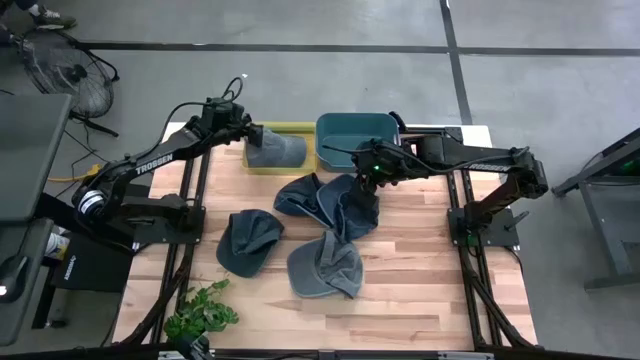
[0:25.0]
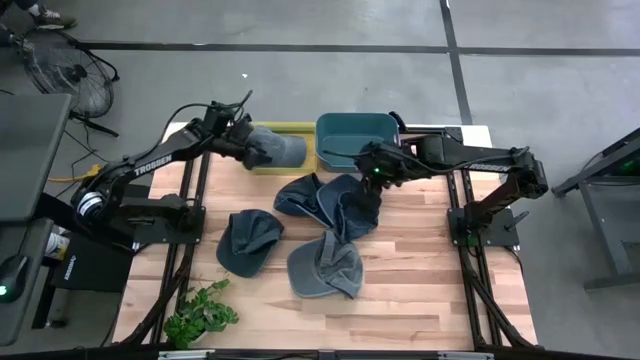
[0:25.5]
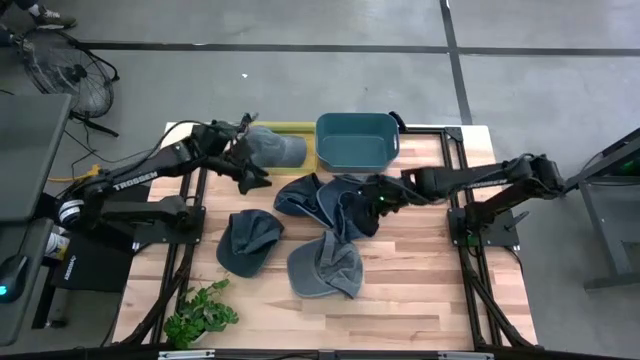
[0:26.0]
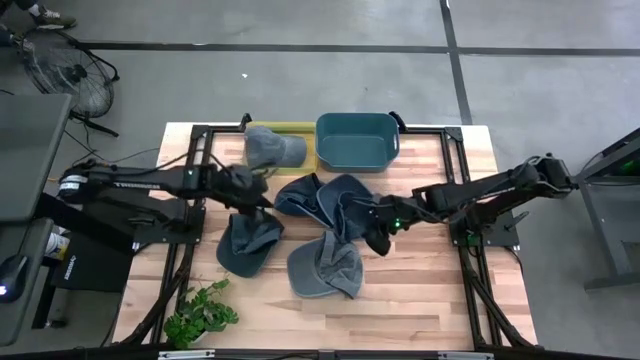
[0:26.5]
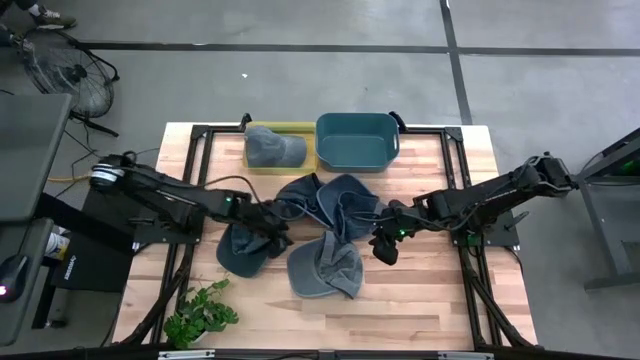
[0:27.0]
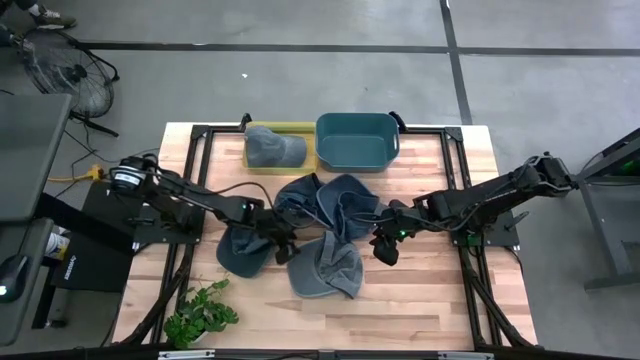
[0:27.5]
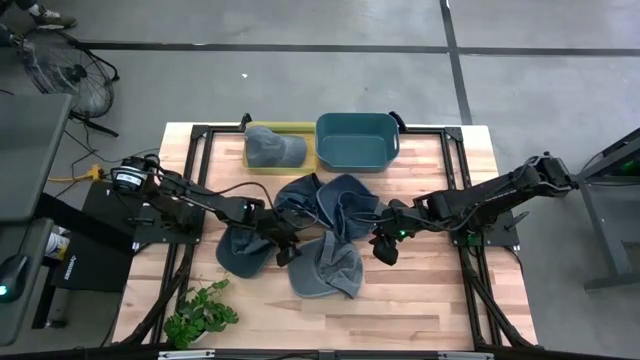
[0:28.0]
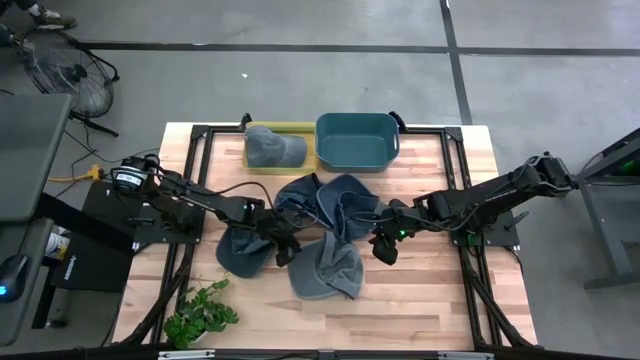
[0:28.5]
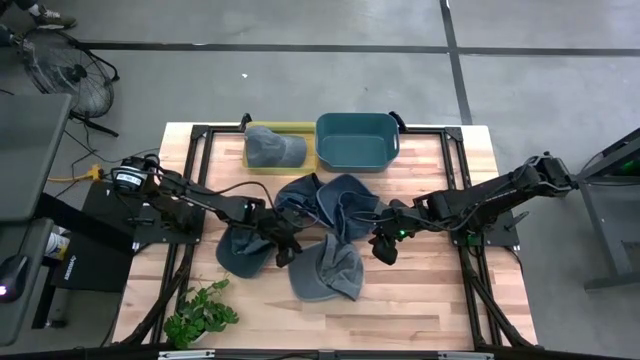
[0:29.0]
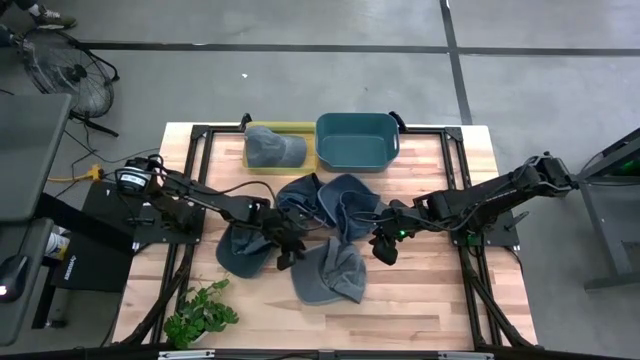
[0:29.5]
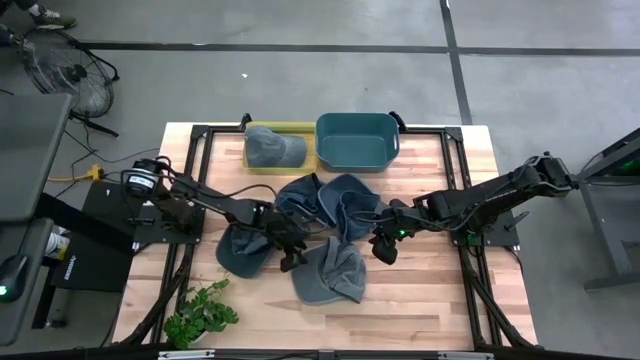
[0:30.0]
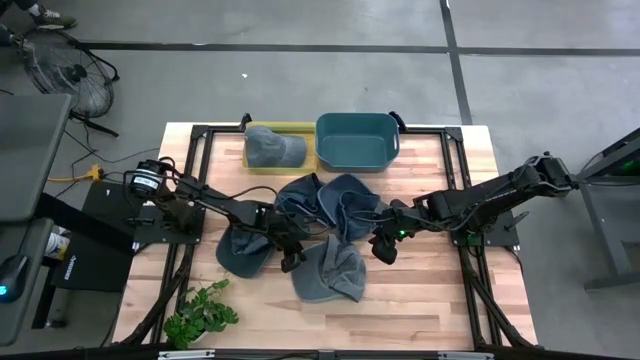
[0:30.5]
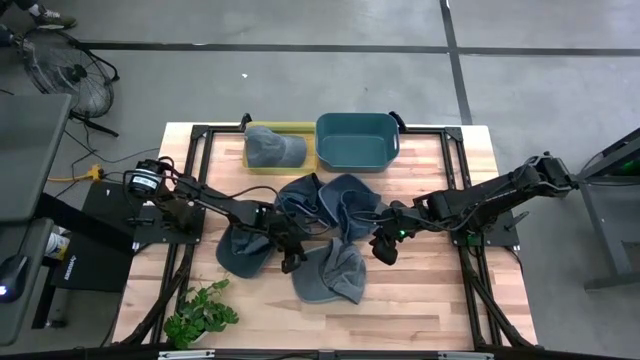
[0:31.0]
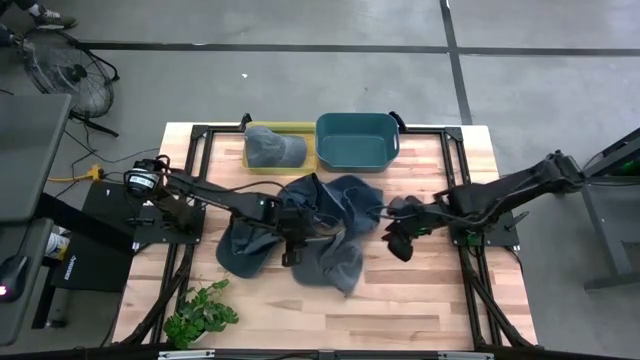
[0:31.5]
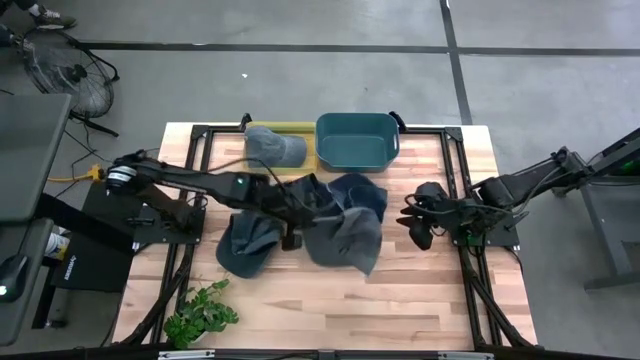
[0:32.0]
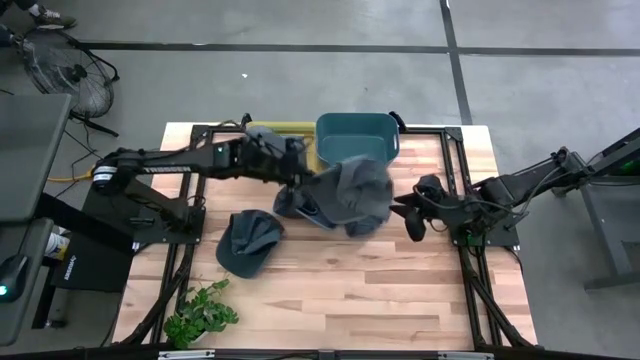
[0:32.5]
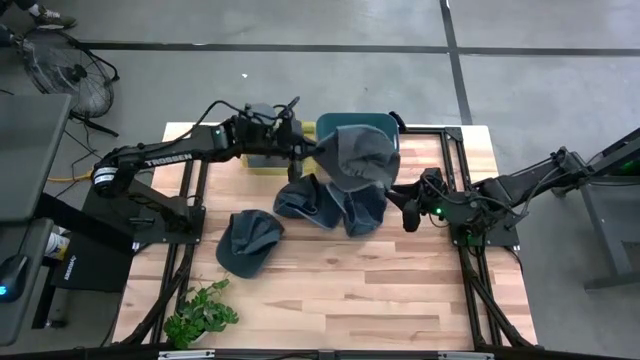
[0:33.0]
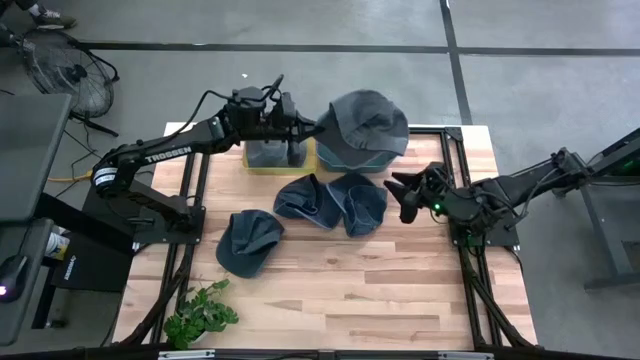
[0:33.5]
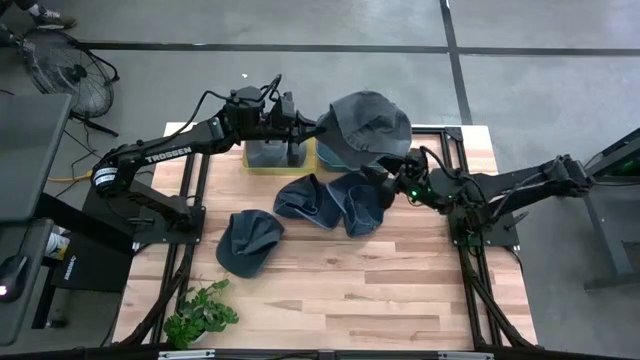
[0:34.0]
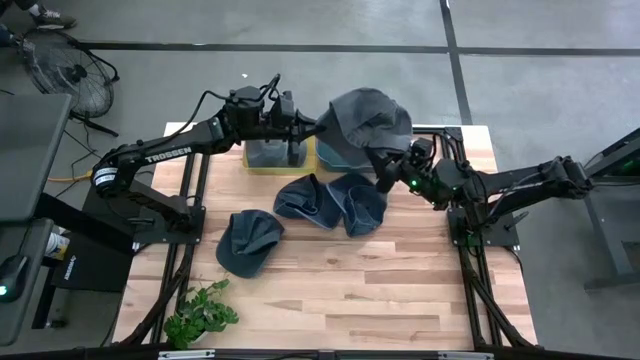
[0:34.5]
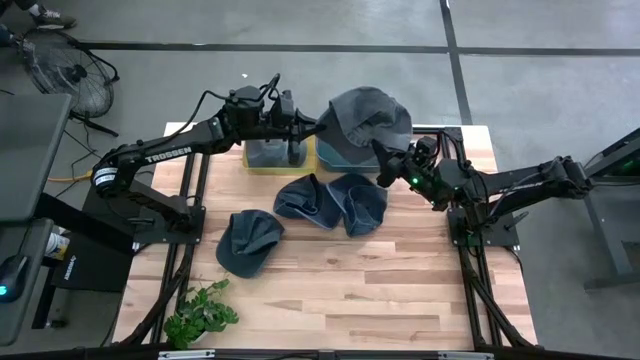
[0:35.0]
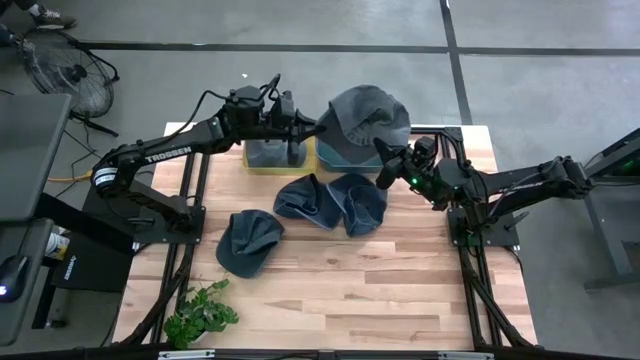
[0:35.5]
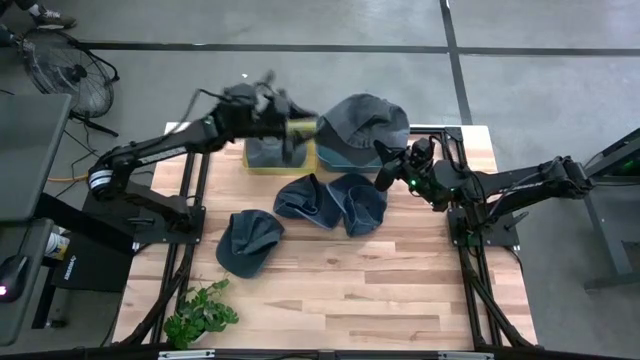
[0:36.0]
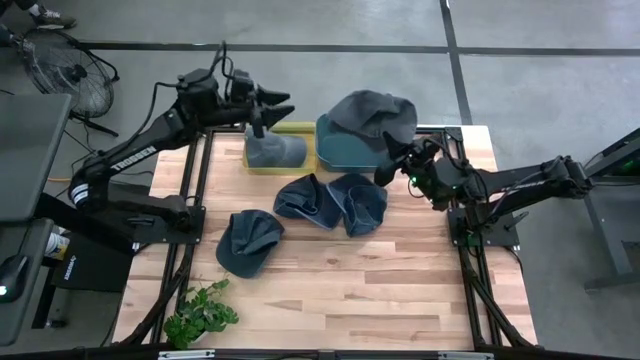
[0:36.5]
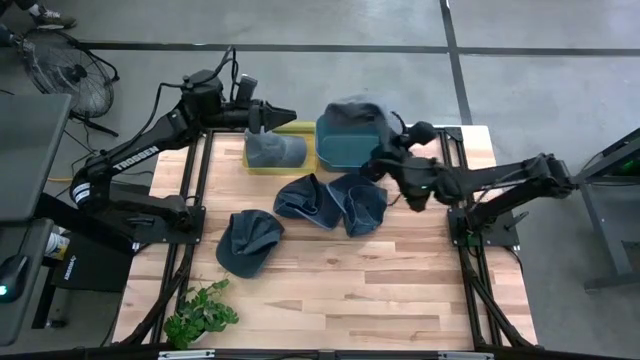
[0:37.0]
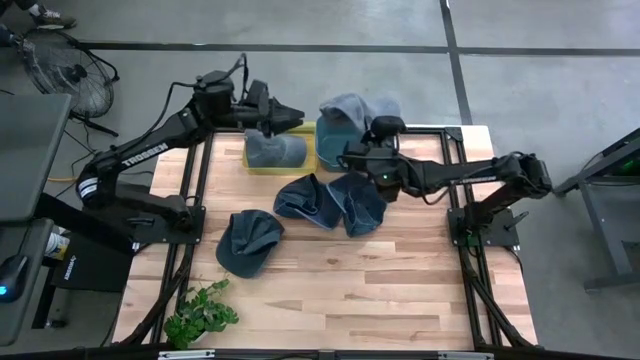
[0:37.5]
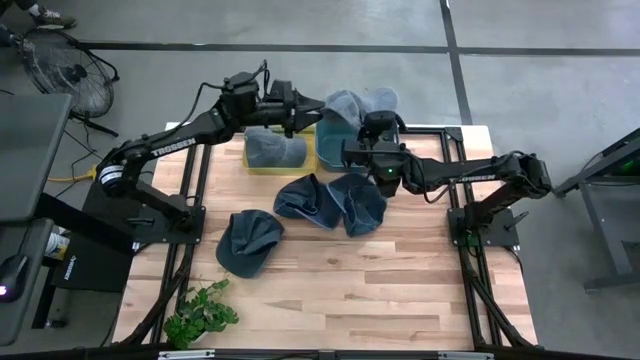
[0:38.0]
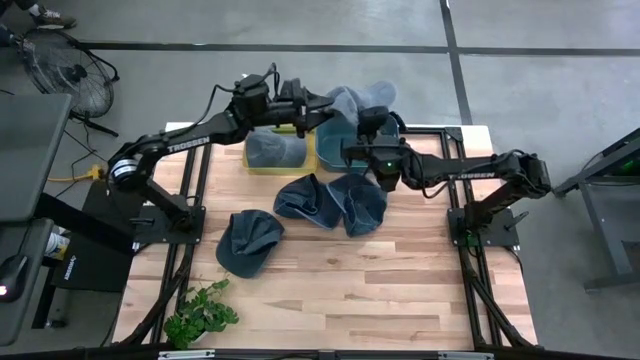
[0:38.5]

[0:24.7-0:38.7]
Task: Pick & Place hat
Put the gray cap into the yellow bin

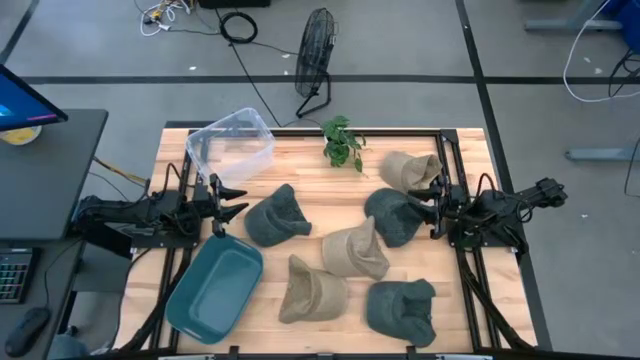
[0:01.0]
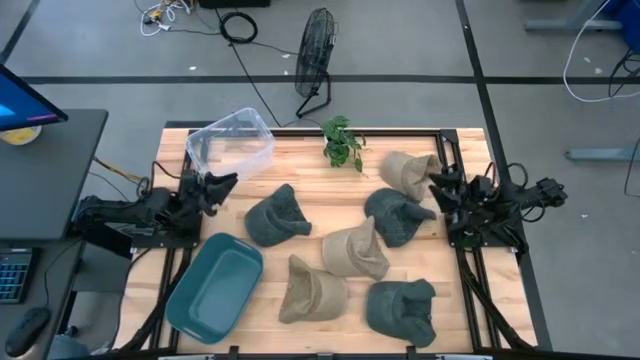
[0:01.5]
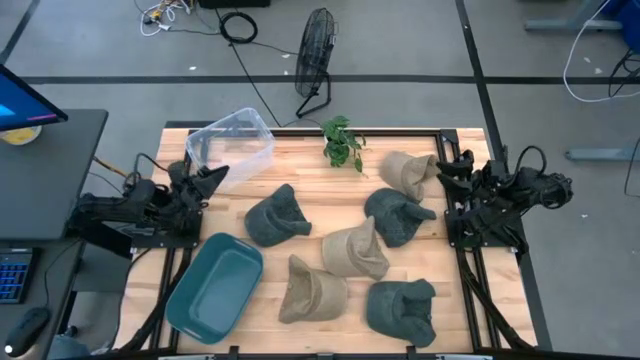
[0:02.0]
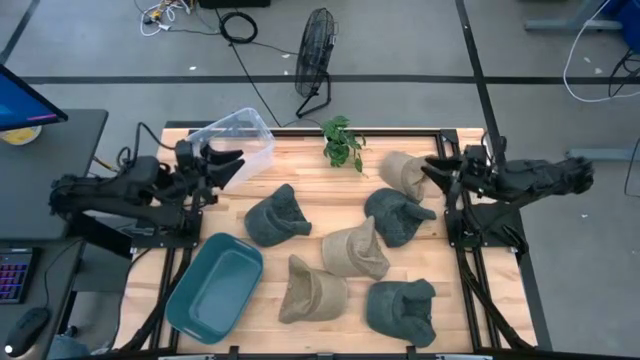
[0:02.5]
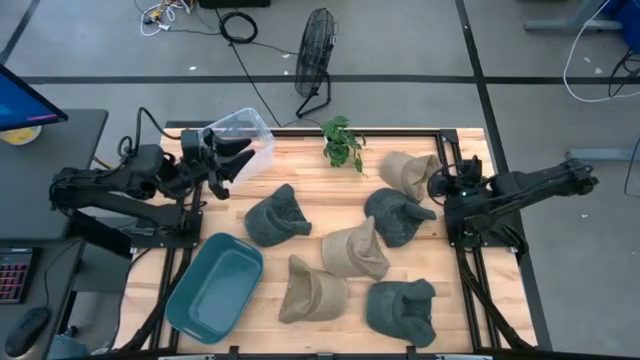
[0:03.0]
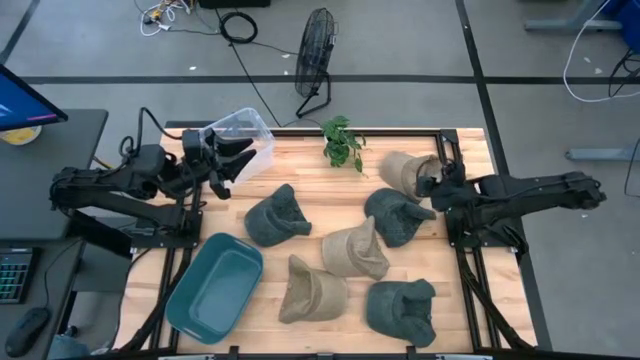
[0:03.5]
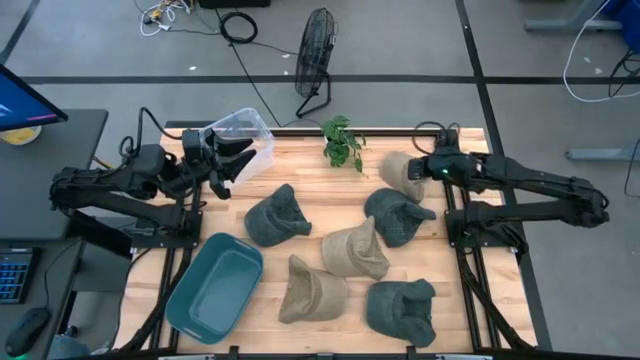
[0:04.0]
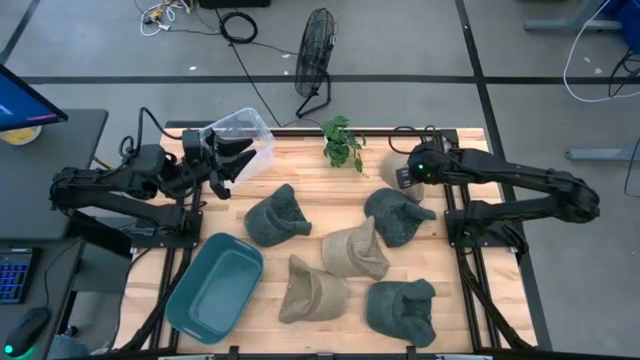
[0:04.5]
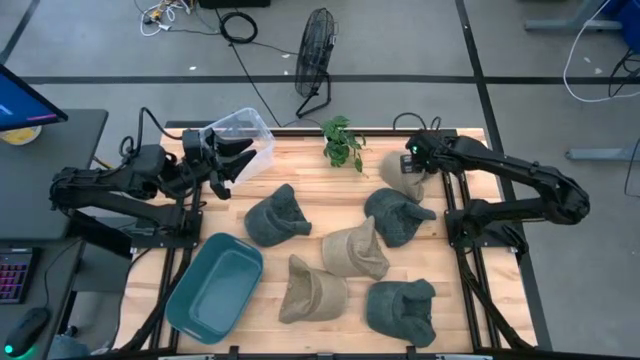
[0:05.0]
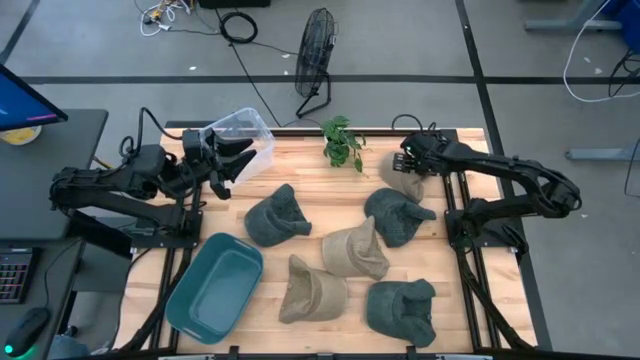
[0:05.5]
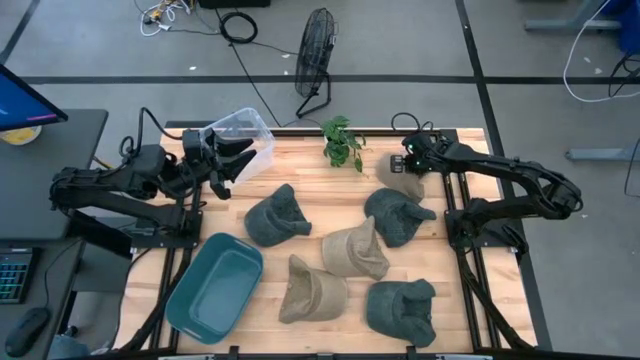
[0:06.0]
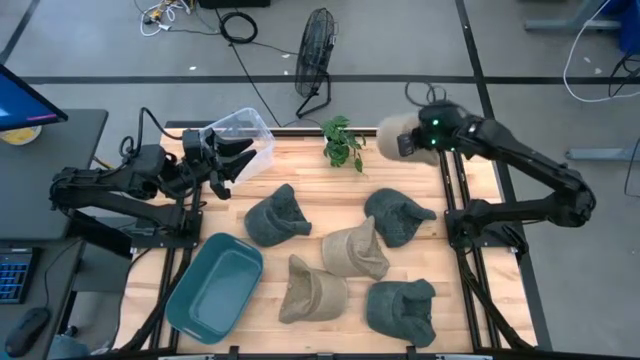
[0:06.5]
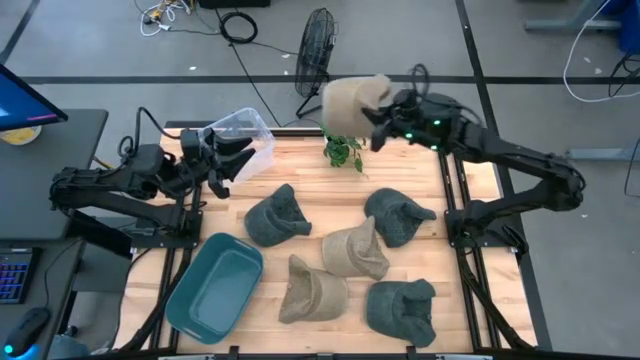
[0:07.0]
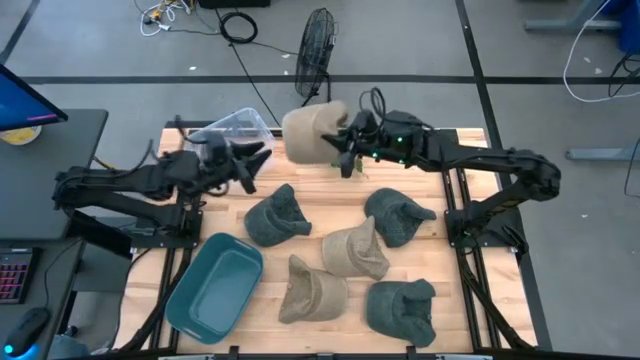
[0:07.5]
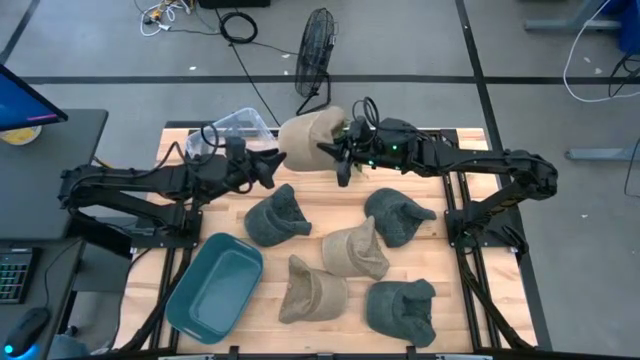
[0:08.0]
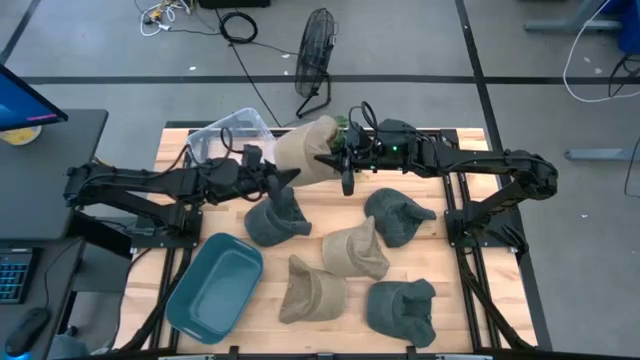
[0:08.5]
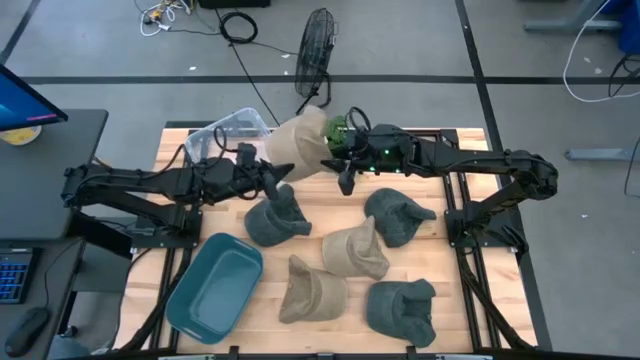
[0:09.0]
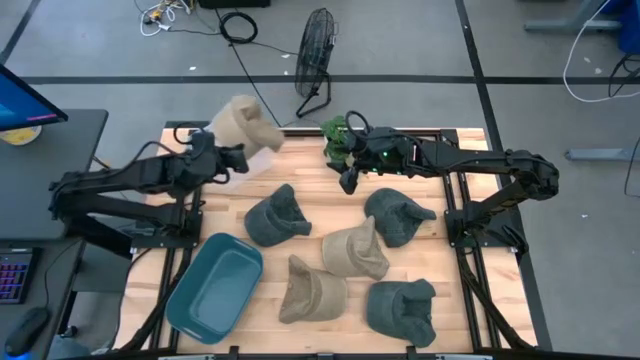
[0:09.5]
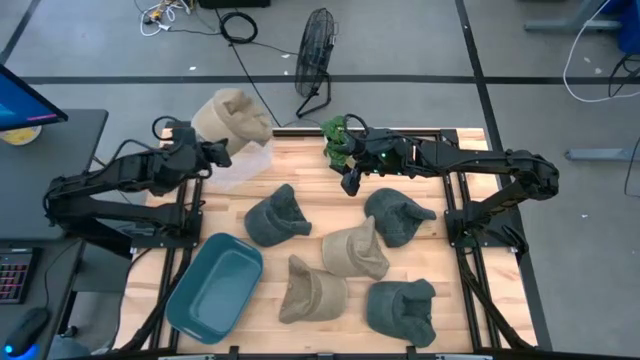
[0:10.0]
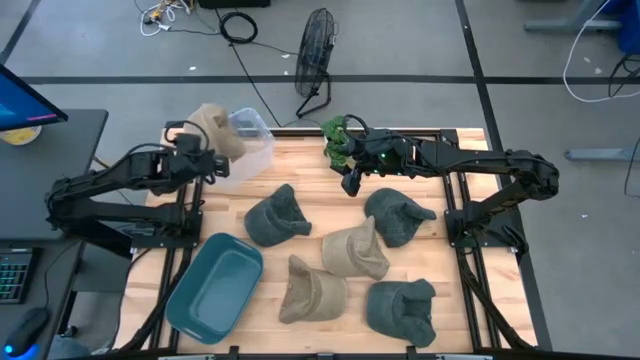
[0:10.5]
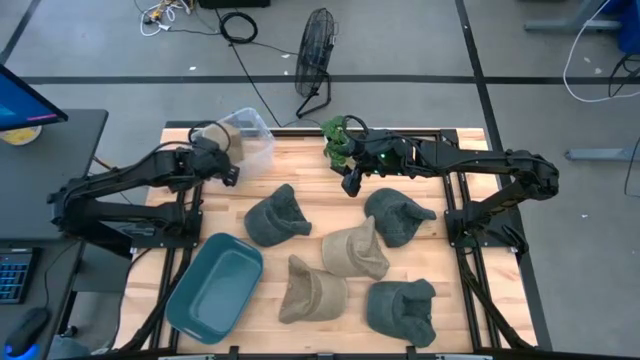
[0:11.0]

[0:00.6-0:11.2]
Task: Pick & Place hat
Put the top brown cap into the transparent bin
